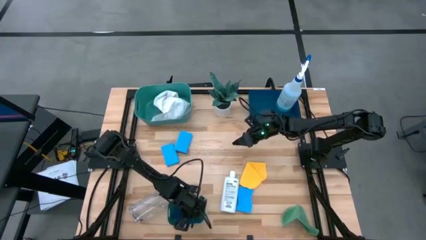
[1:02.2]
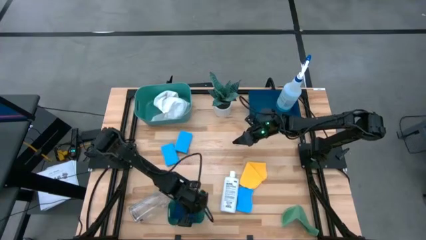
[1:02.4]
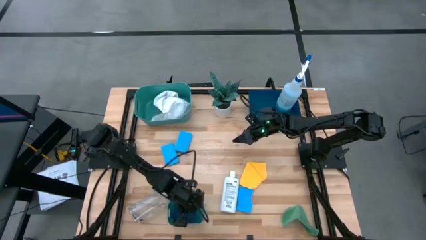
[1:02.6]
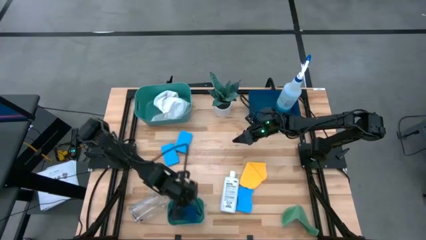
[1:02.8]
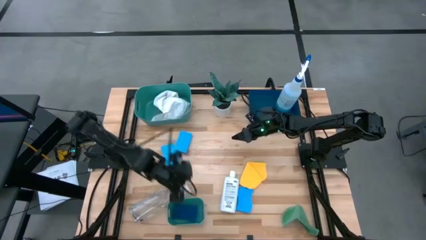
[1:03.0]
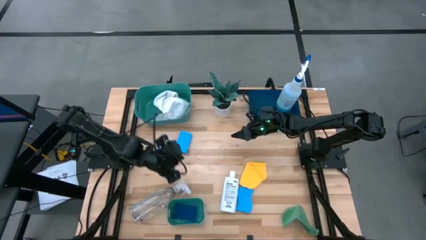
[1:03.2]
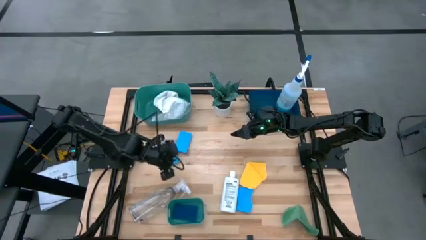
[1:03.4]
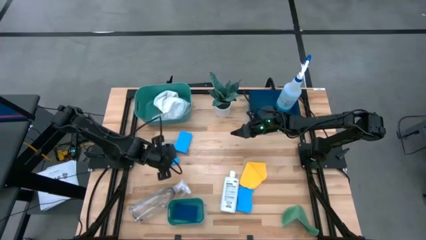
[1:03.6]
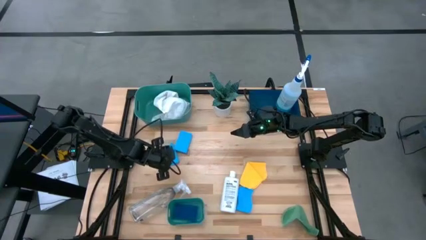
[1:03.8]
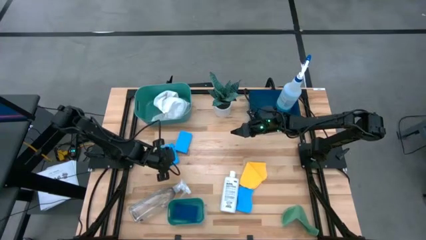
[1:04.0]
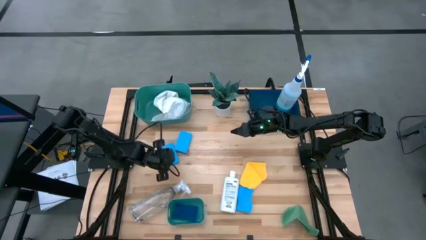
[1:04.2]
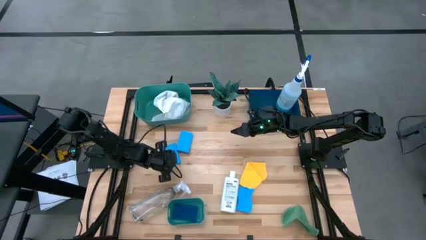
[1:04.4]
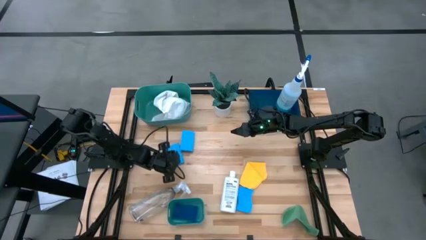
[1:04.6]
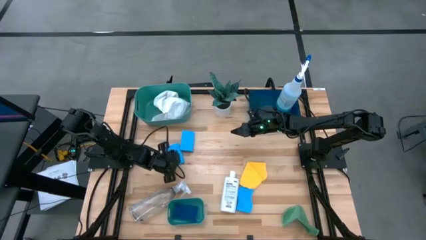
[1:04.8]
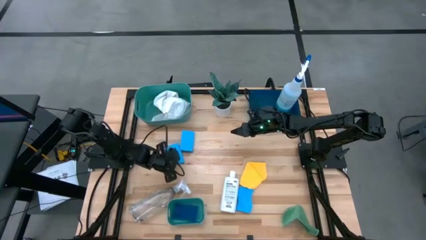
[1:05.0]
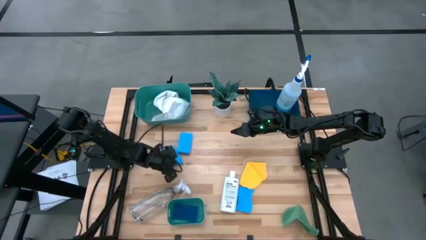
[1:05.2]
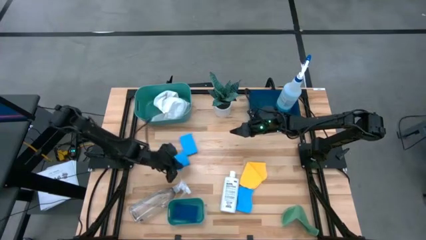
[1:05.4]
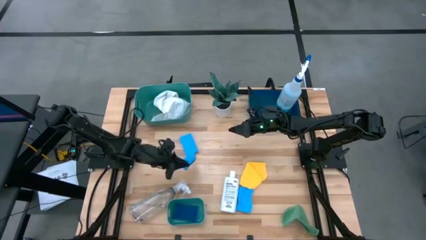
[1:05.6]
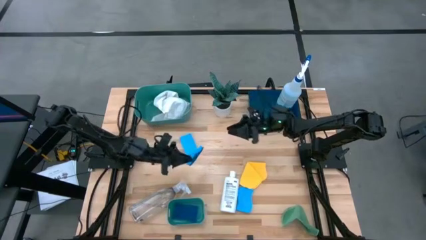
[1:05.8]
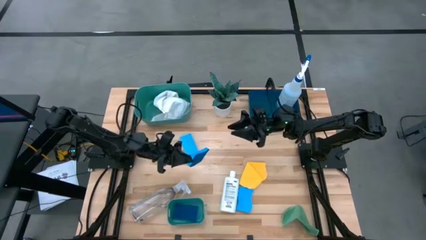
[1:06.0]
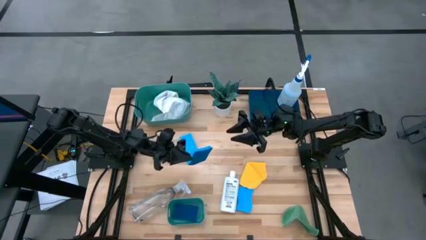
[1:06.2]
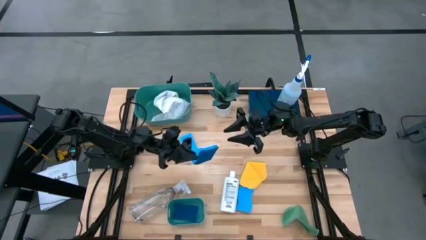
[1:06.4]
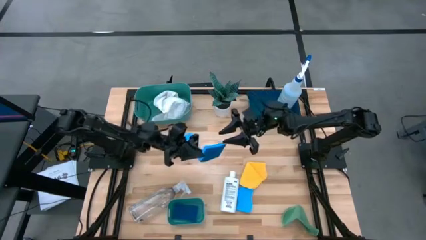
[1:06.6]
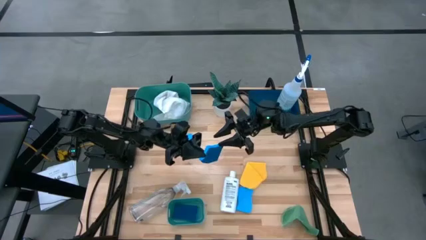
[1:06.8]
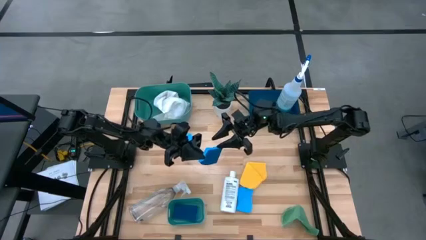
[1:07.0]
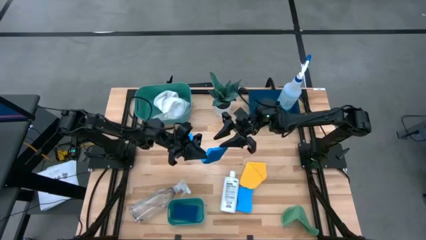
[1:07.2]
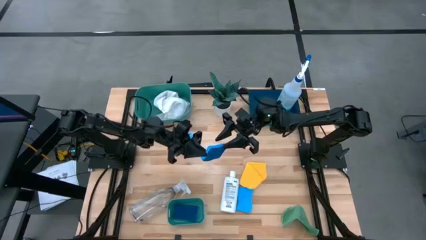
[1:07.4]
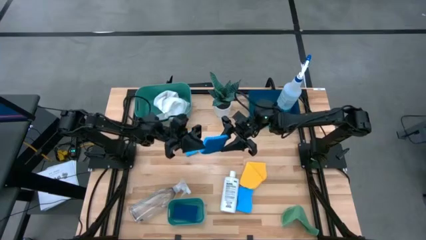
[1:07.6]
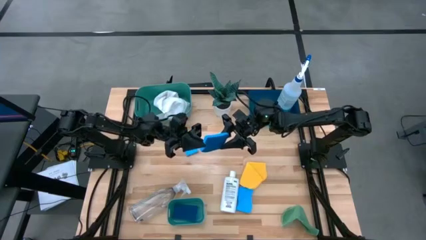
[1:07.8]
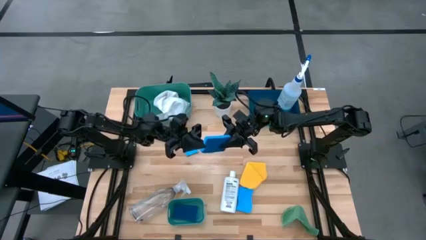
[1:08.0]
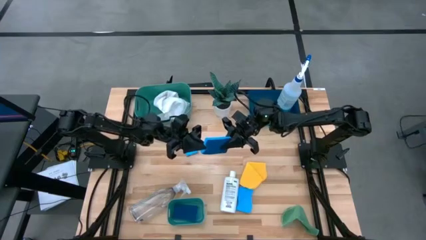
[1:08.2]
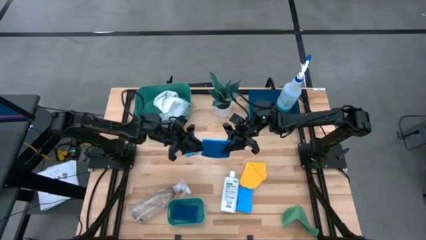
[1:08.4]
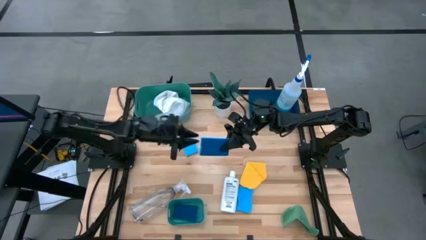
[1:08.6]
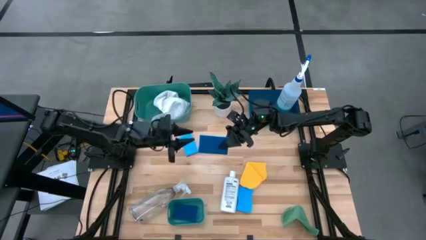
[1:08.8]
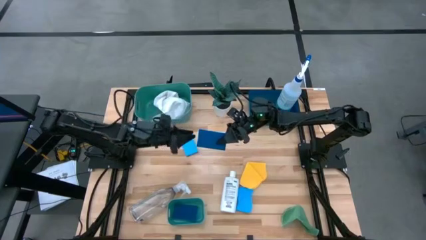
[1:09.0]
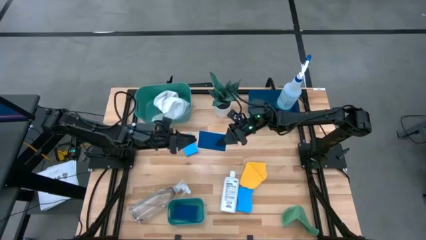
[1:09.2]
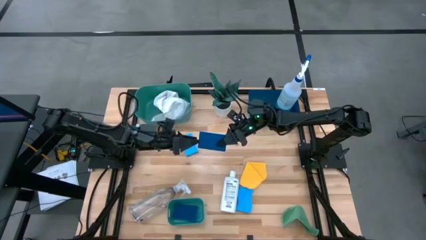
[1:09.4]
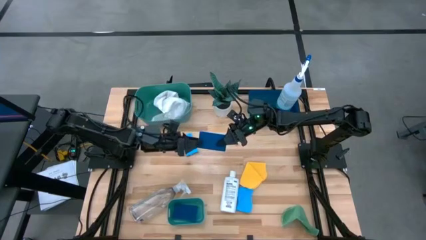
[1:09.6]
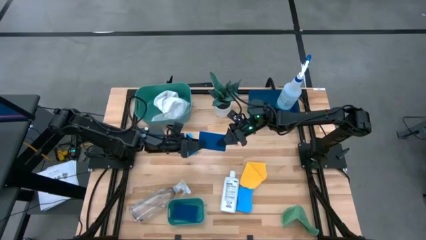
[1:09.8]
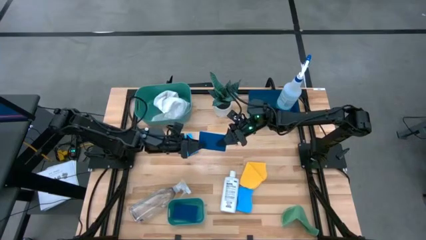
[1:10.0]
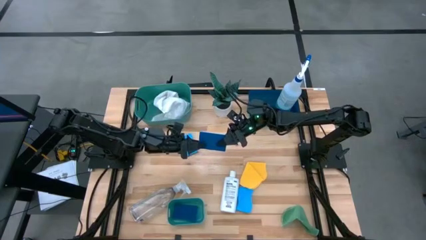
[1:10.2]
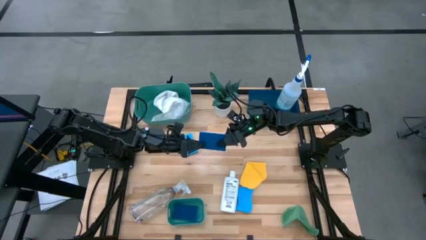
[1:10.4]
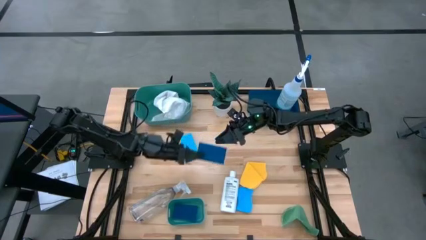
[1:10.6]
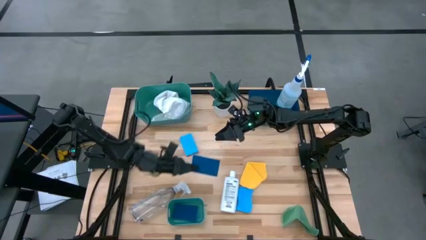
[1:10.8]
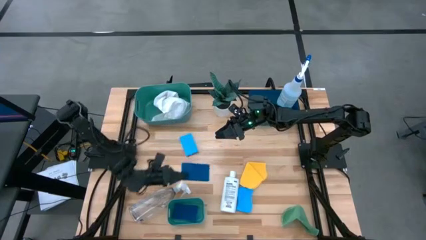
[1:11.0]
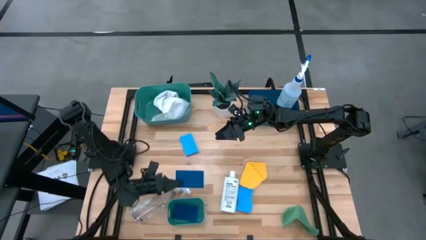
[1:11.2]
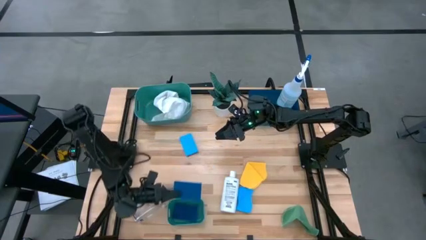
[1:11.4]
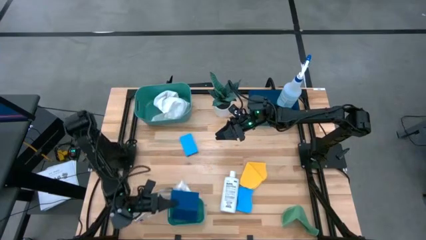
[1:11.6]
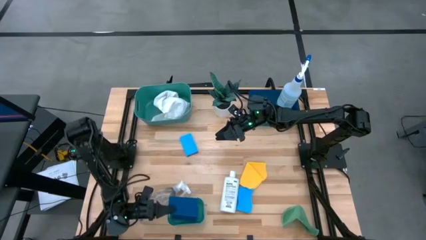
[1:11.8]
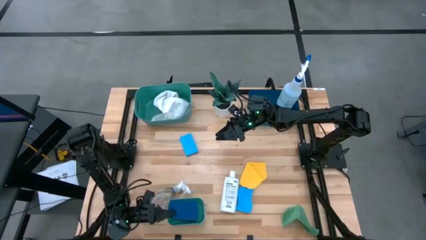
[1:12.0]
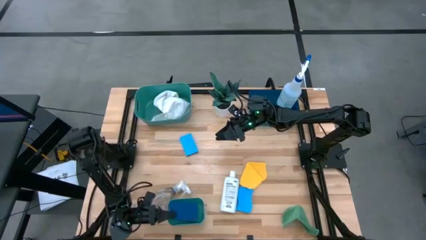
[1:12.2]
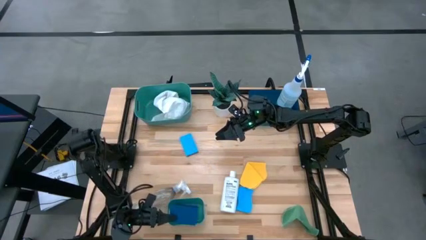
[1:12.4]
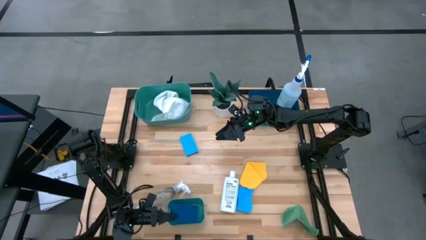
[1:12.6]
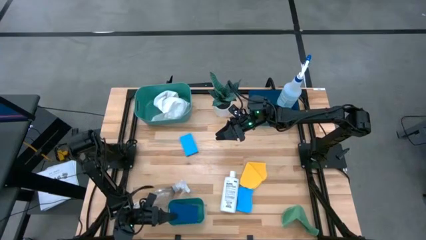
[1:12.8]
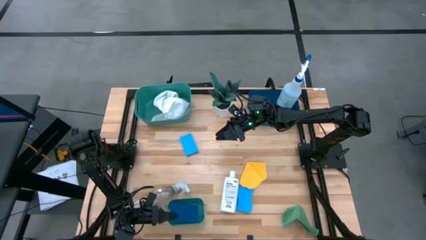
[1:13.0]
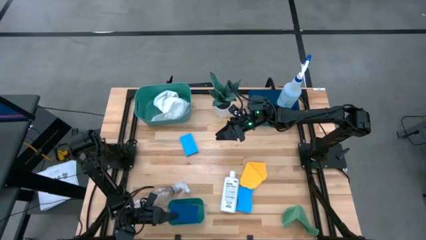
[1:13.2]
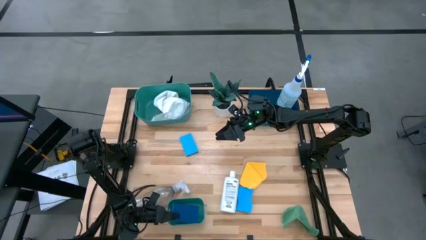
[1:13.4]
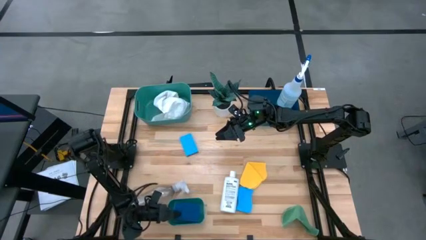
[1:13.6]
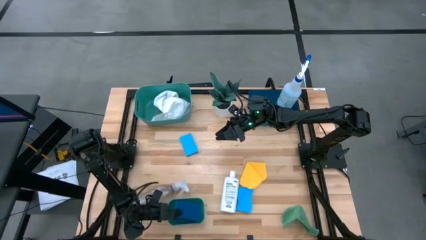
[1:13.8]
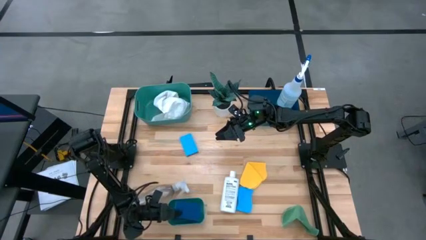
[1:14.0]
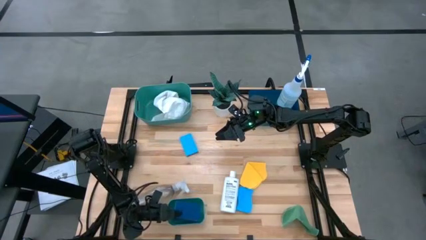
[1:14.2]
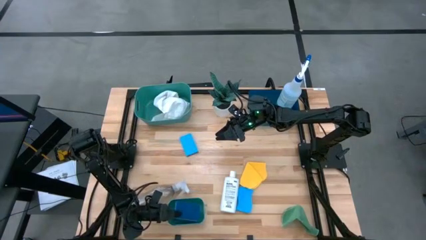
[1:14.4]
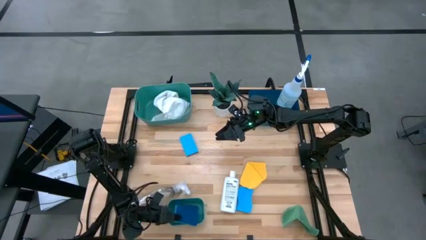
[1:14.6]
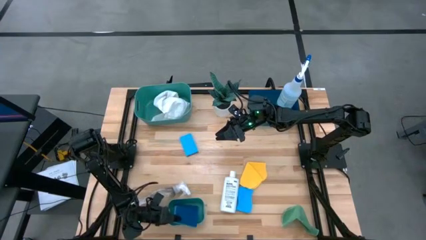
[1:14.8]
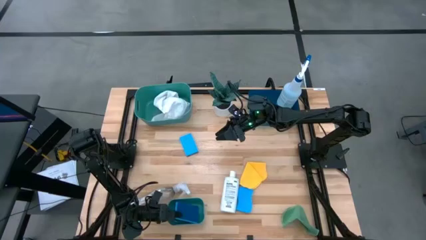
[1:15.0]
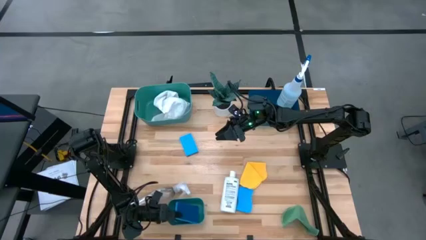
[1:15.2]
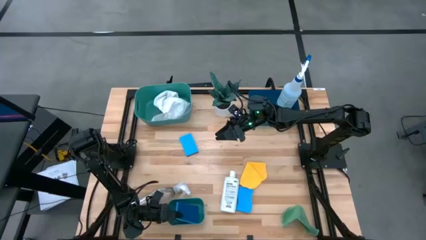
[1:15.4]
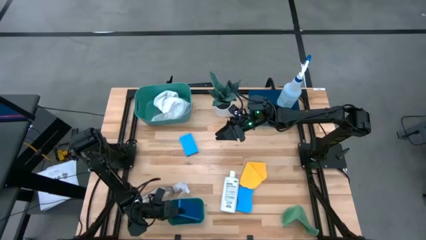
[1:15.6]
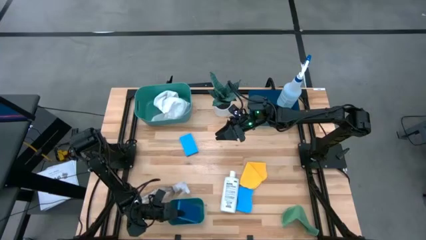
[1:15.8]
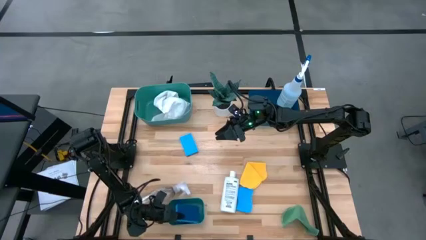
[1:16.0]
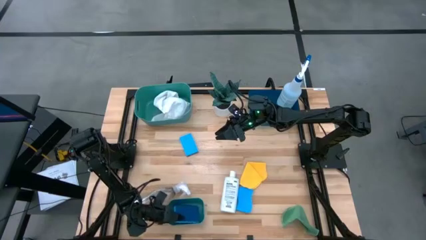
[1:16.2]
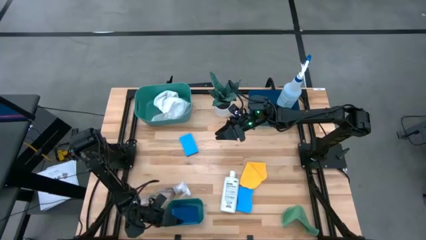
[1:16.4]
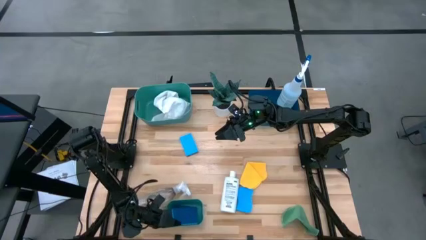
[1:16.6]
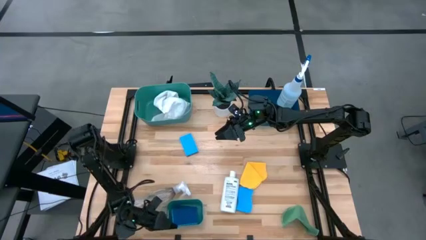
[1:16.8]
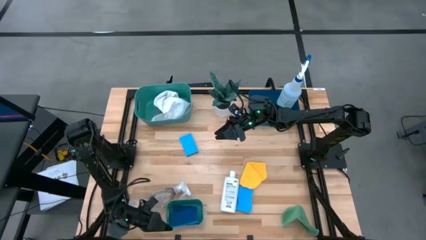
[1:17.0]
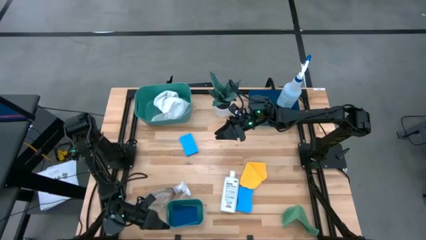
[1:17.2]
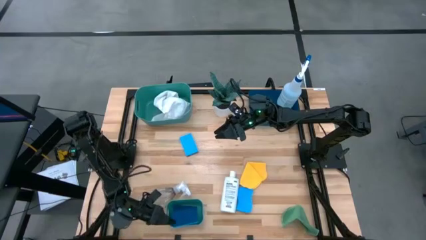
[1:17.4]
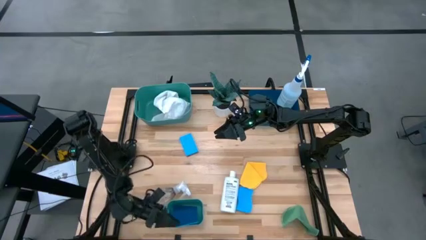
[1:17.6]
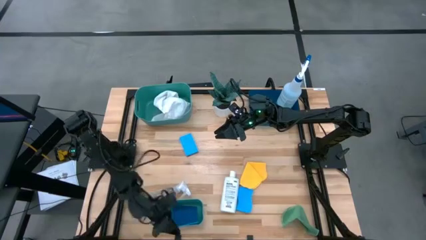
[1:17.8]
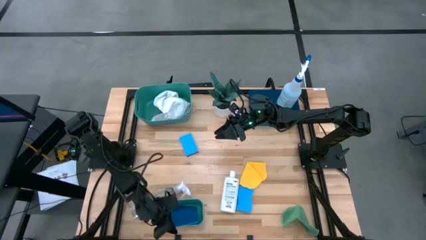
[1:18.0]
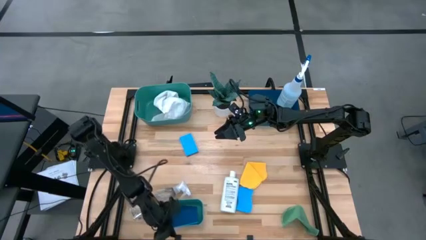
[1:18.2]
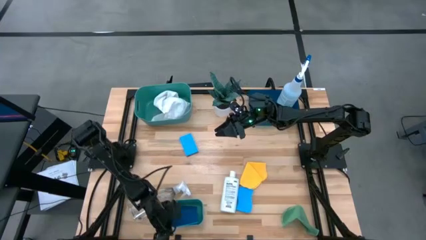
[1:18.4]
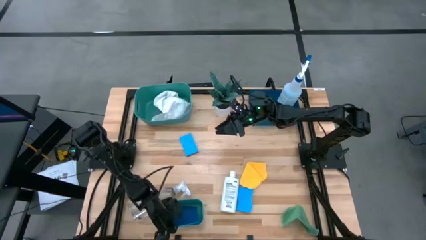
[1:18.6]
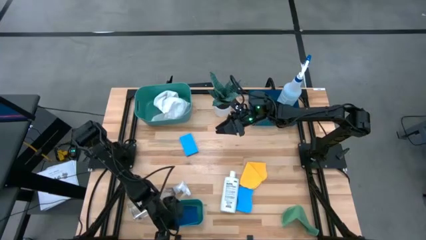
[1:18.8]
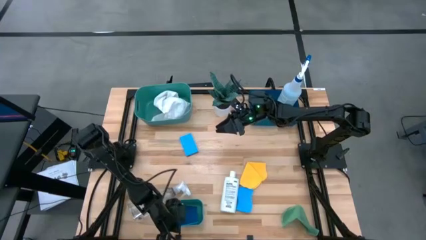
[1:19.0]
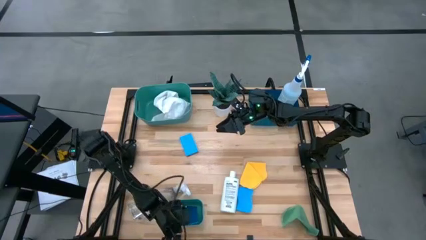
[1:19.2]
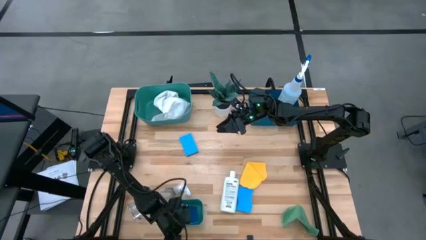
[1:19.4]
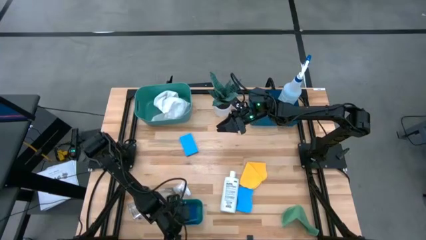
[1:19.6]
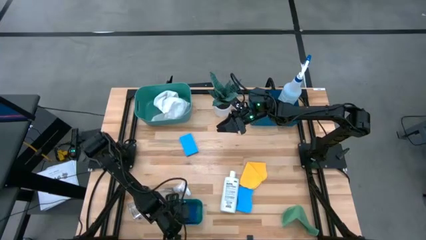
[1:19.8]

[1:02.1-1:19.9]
Task: Pick & Place Kitchen Items
Put the blue sponge into the bottom green bin
